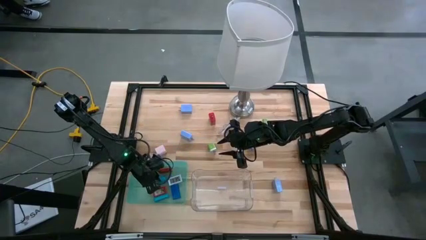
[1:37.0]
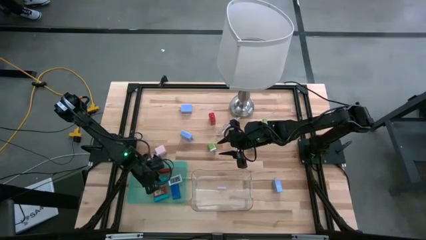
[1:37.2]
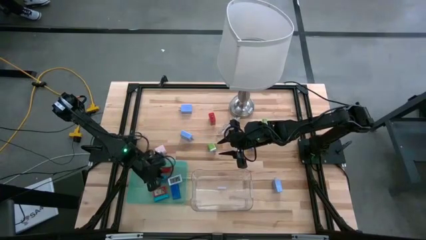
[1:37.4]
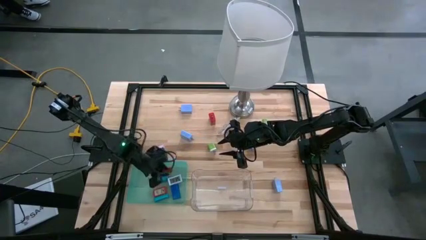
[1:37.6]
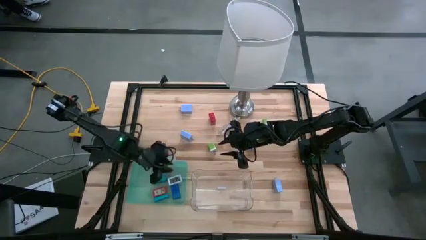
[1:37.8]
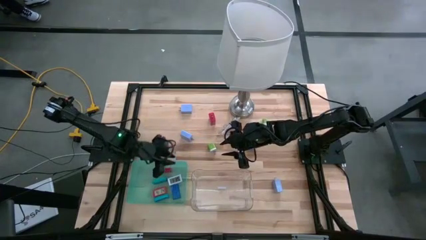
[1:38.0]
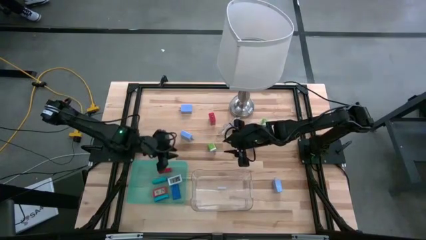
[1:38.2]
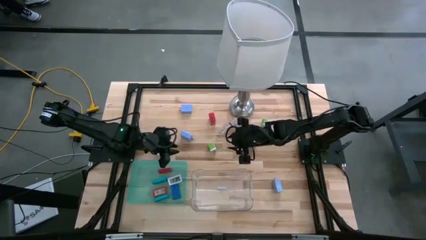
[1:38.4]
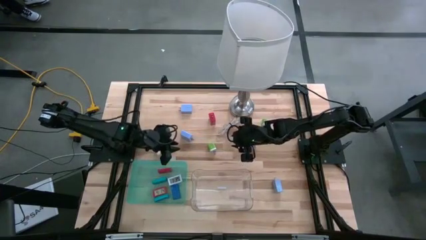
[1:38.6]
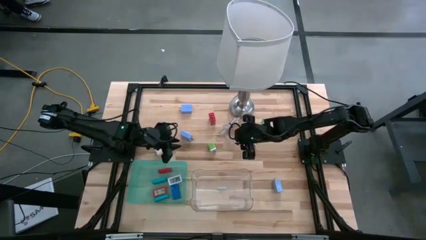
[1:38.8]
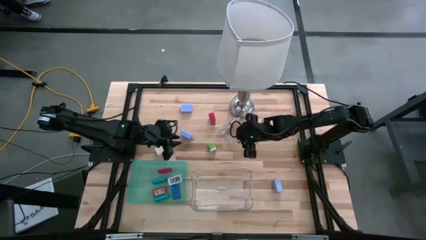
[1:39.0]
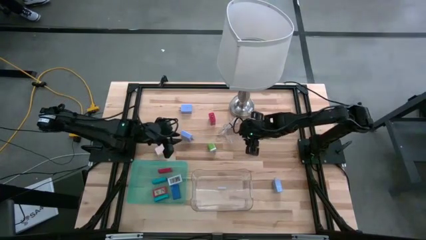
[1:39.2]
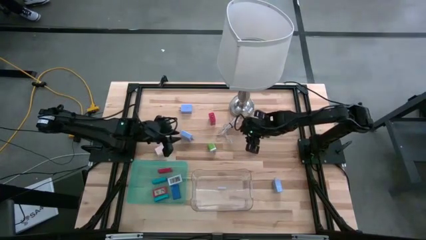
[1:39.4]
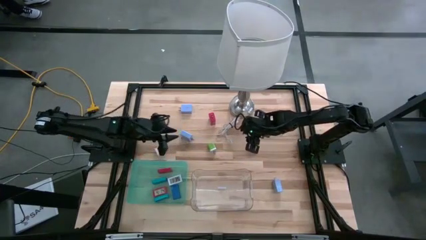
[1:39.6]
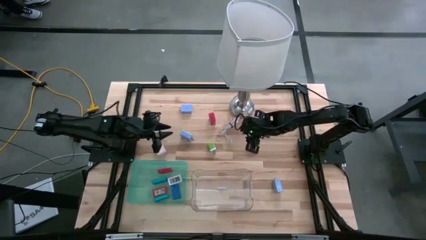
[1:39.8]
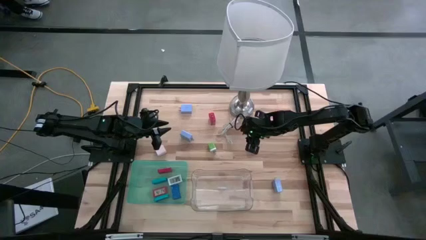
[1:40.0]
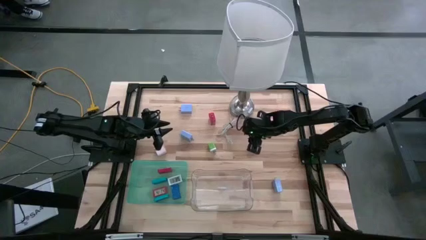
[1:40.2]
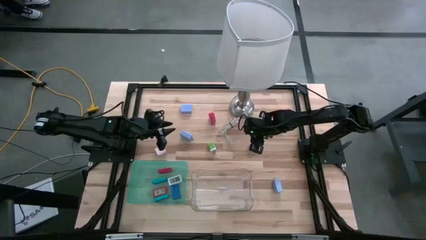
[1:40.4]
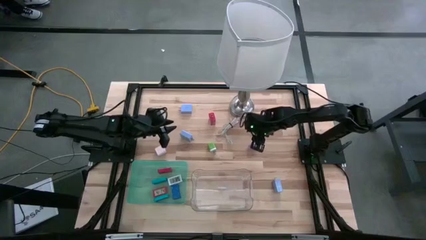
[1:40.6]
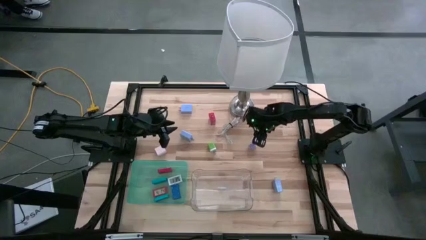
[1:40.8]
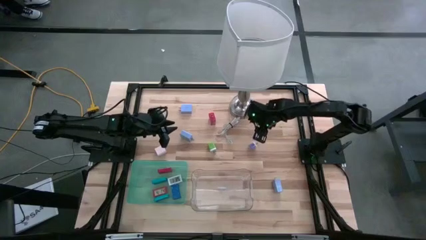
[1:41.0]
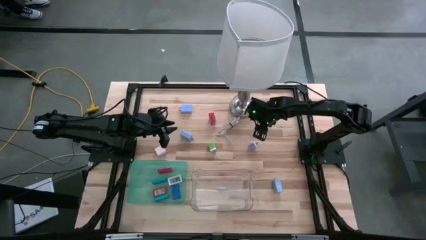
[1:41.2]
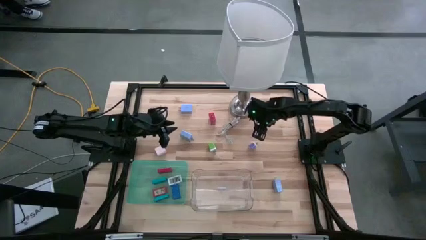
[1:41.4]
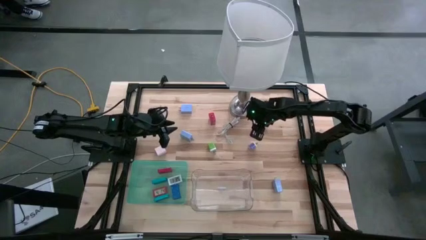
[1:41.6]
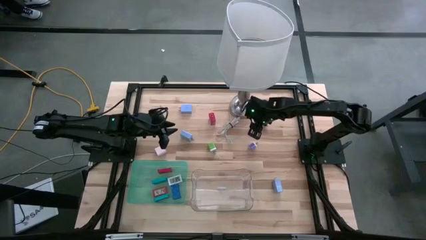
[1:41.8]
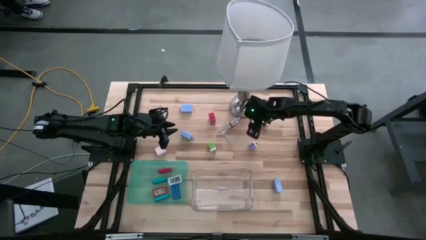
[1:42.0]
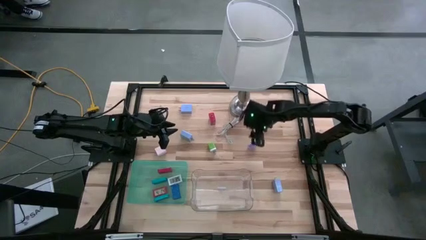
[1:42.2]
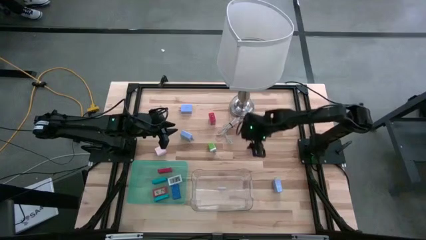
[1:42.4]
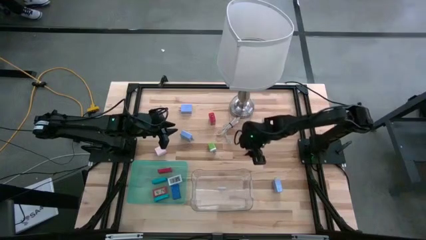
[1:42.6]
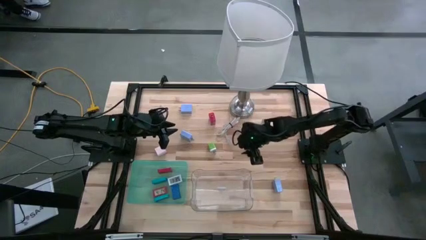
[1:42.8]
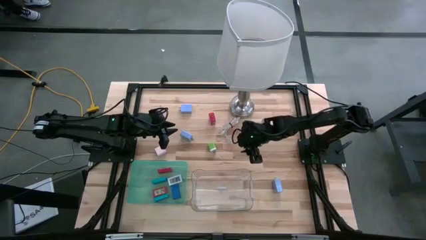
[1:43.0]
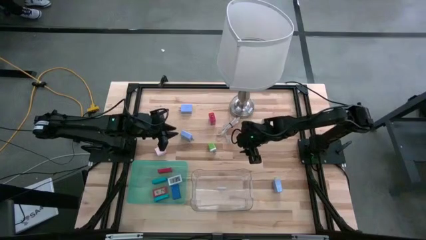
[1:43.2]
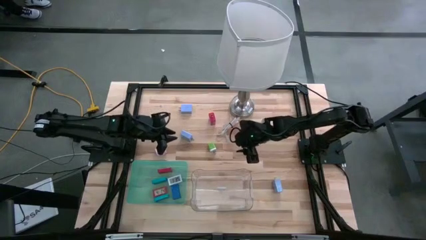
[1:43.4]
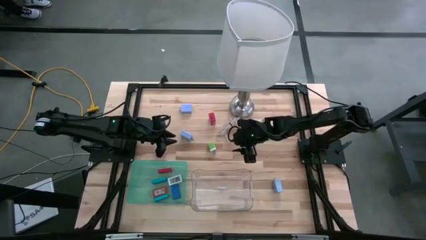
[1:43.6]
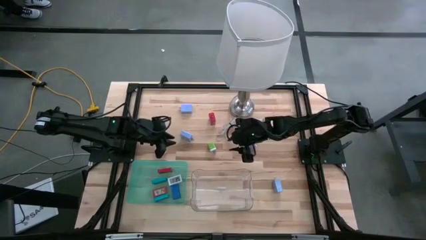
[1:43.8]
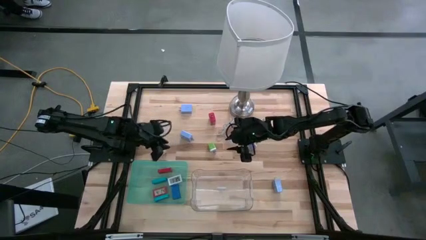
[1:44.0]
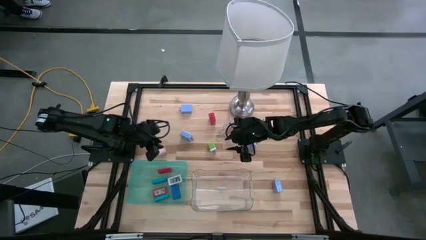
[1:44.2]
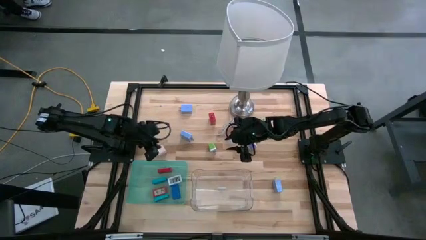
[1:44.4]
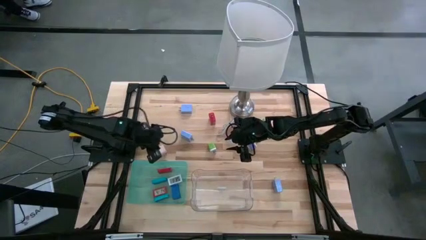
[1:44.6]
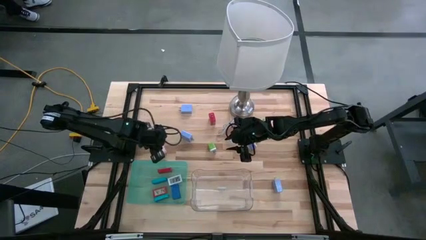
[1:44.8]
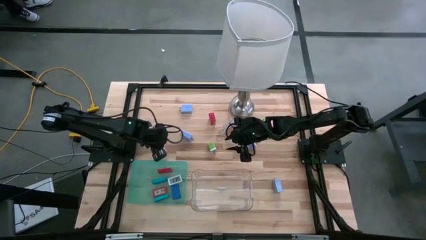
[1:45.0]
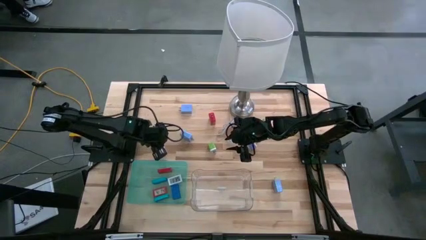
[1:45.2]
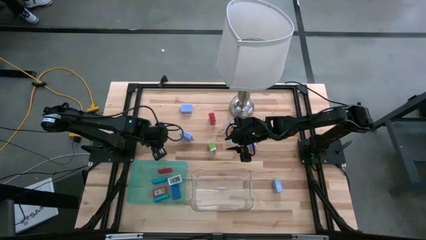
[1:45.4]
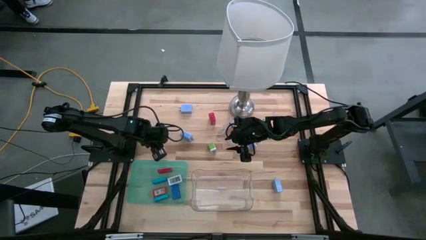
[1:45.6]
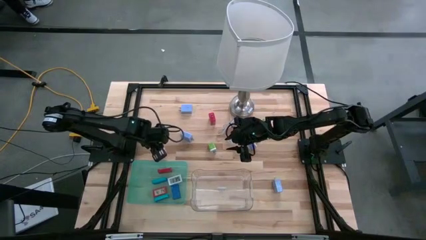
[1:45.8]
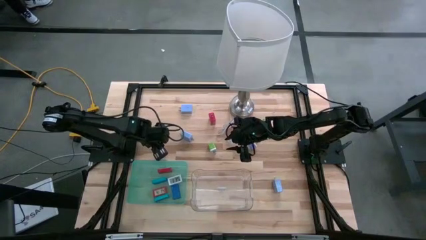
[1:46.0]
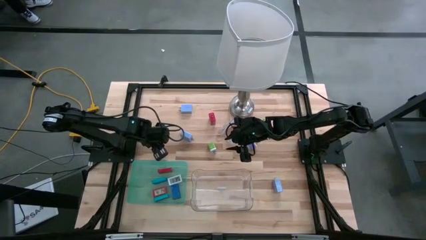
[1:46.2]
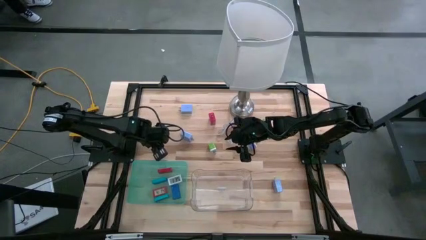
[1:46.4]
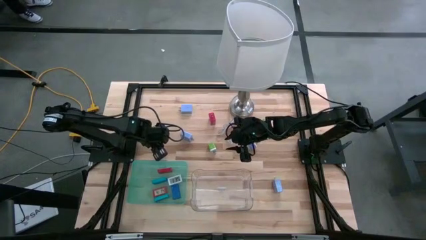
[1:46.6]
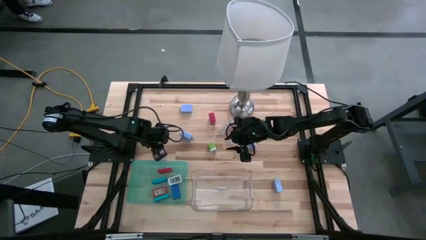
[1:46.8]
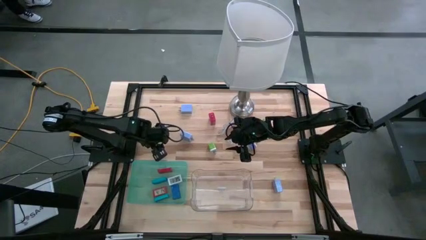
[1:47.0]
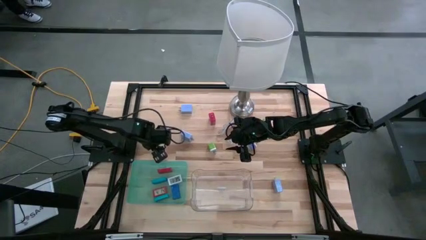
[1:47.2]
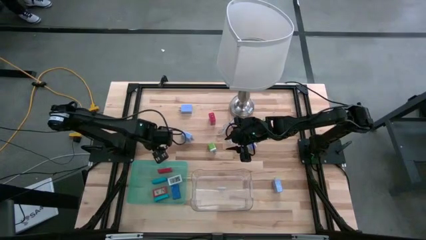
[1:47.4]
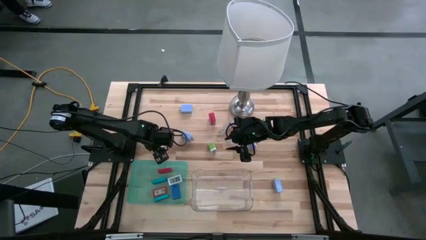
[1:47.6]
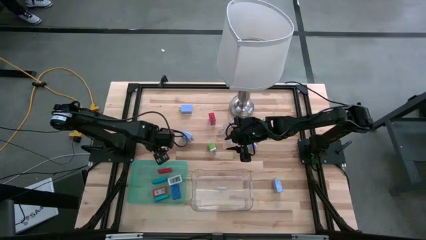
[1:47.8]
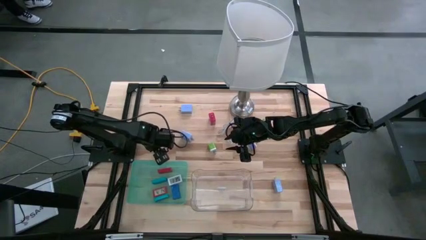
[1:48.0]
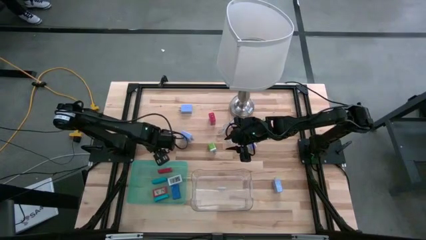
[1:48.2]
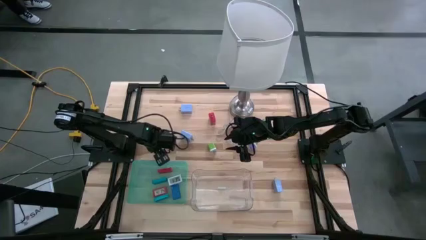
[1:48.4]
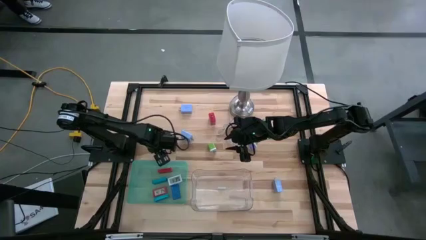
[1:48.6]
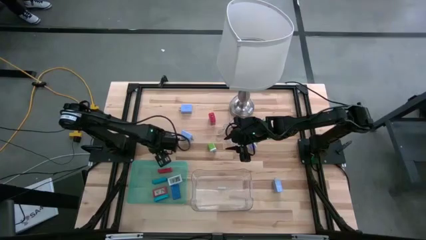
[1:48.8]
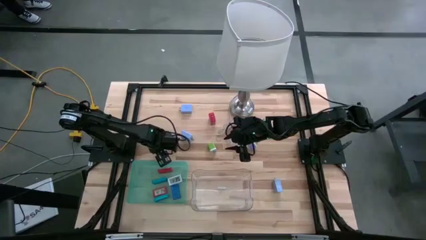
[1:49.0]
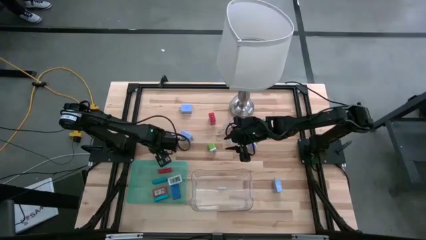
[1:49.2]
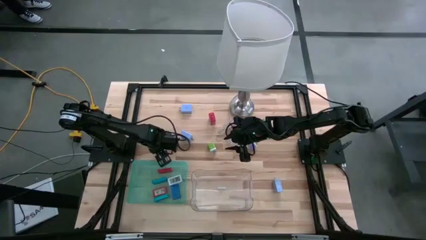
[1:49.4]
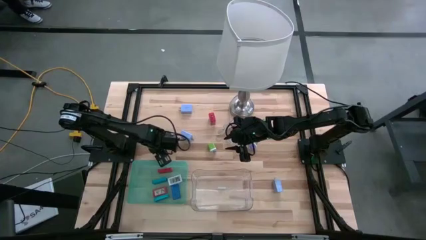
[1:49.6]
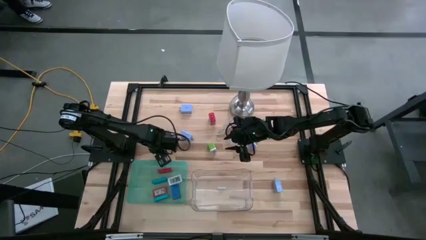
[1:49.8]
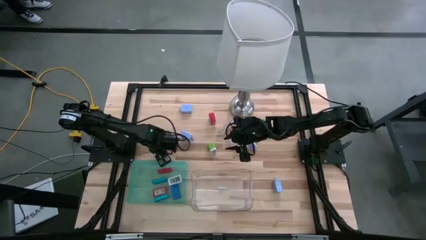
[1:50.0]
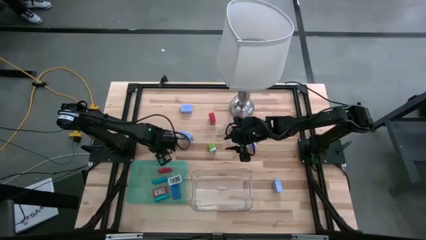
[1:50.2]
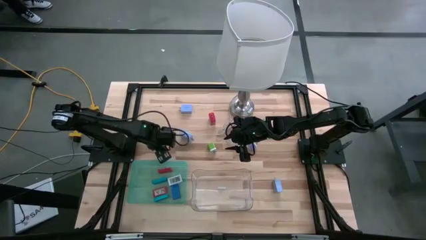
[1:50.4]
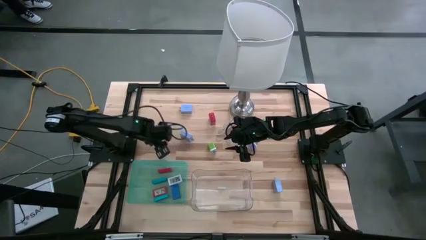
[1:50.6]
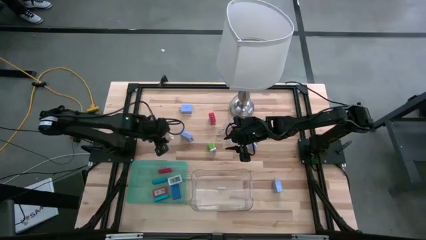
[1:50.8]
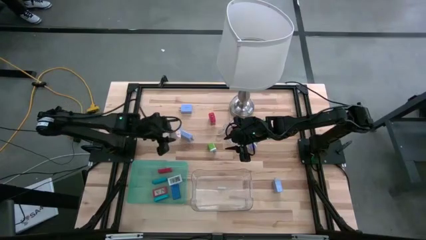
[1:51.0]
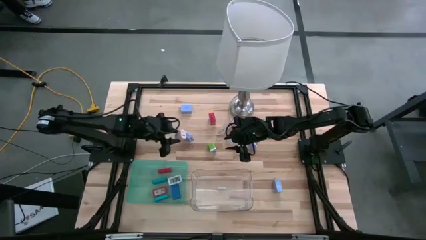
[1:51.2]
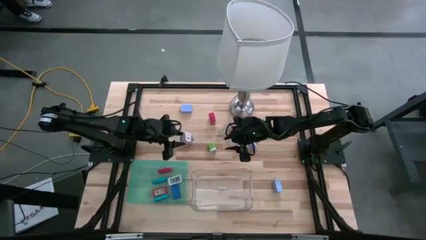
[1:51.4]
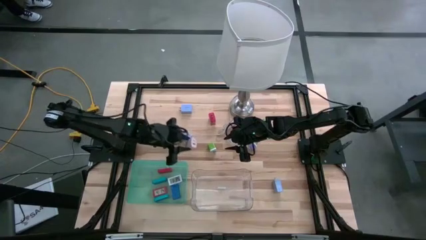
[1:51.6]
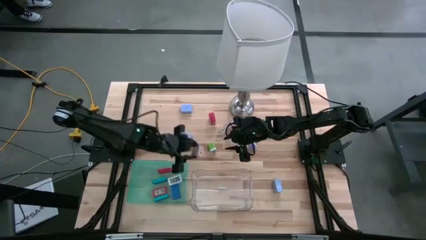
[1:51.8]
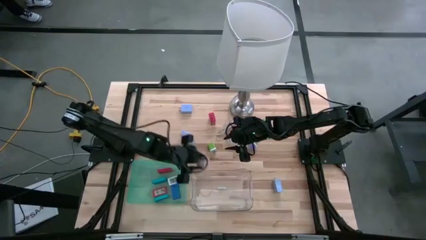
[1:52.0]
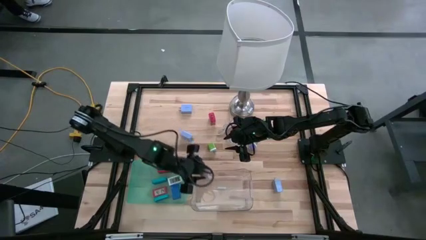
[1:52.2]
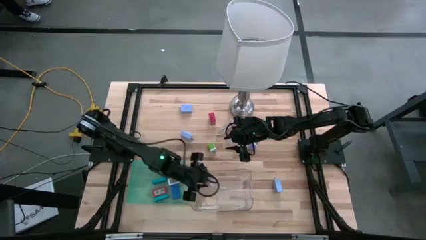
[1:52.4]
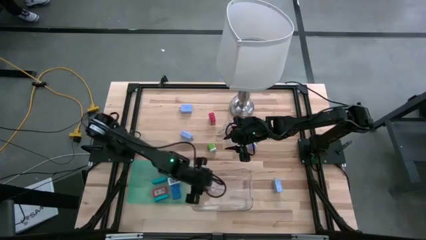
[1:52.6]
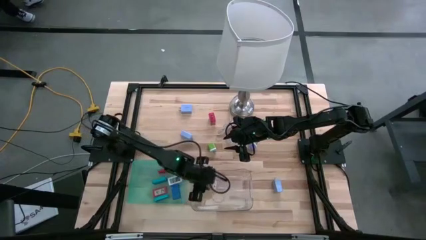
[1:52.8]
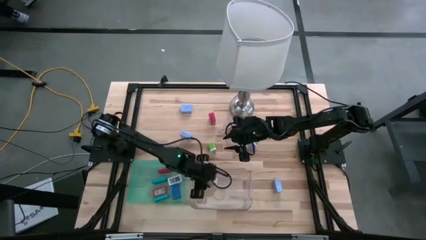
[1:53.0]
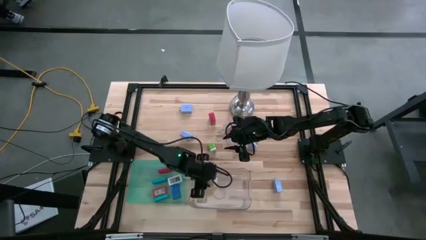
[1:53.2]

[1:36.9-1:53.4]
Task: Pick & Place Office items
Put the pink charger adapter into the transparent bin

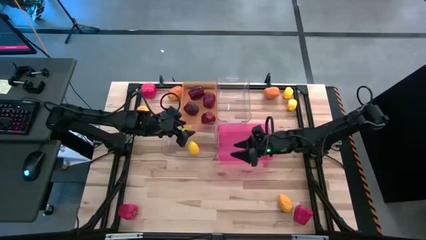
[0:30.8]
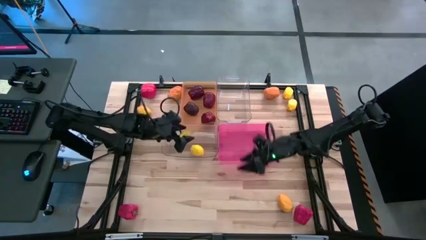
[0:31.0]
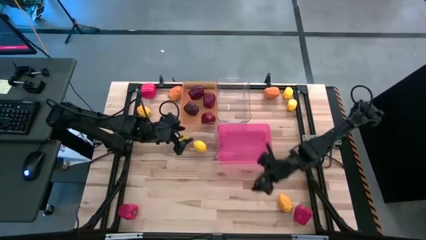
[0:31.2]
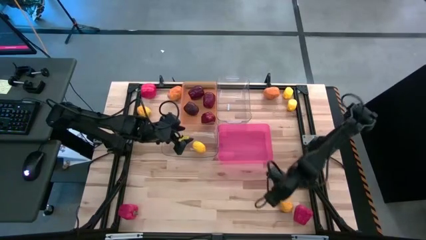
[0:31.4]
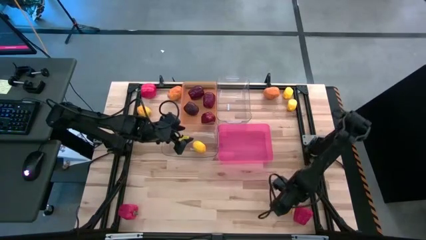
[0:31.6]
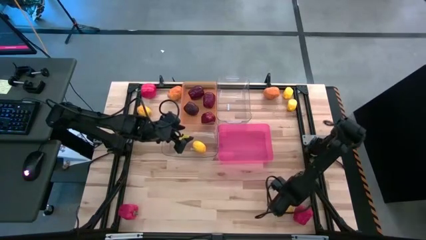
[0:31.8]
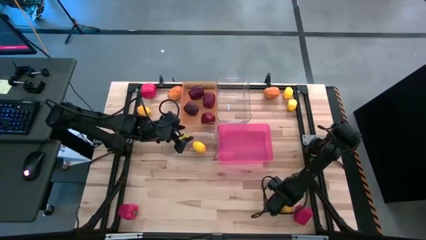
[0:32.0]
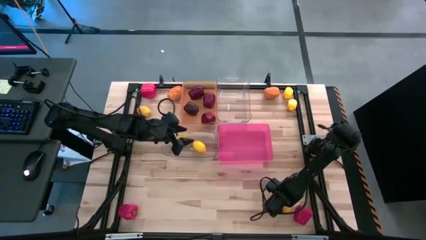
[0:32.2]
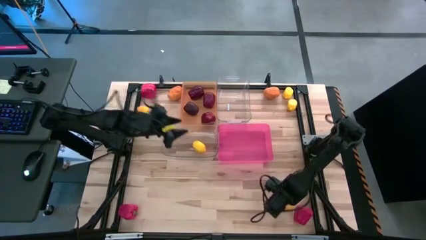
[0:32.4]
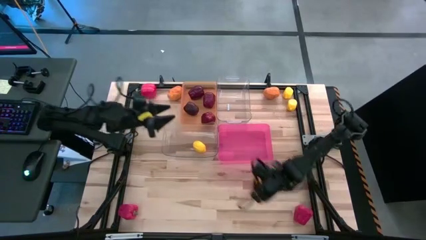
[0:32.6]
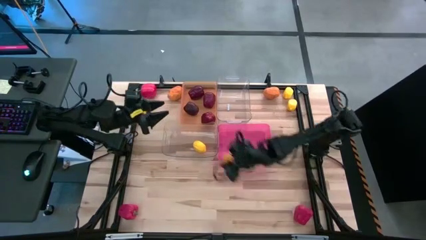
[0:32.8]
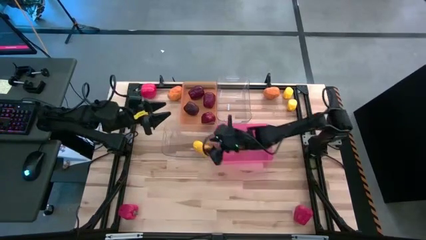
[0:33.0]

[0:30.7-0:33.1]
Task: Sort produce into baskets
Put the yellow lemon into the bottom transparent bin
